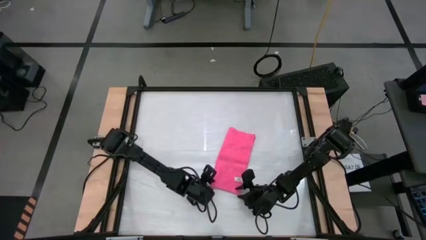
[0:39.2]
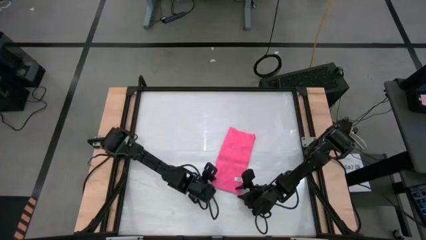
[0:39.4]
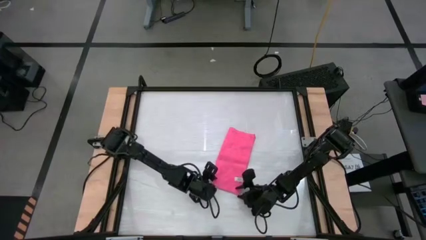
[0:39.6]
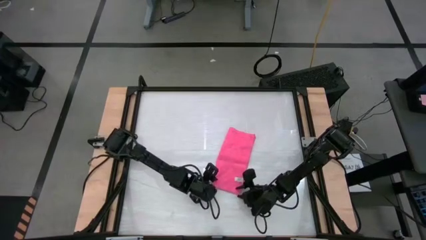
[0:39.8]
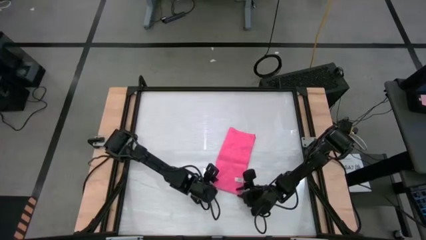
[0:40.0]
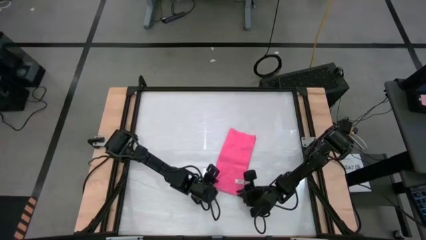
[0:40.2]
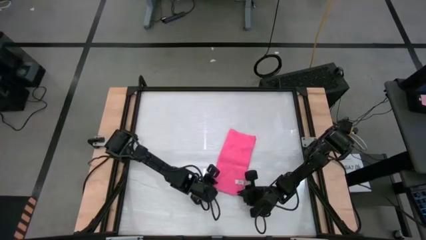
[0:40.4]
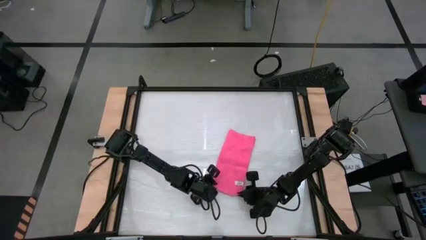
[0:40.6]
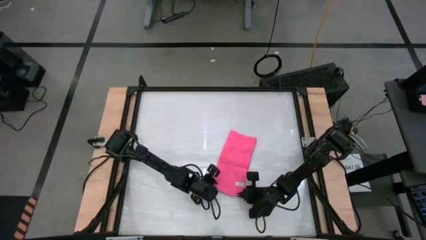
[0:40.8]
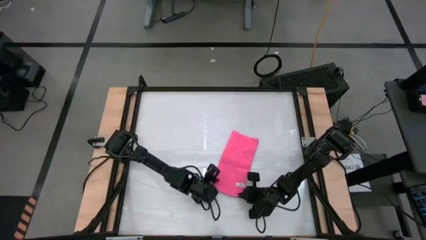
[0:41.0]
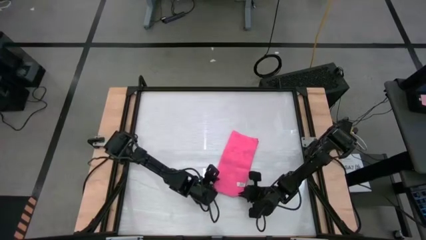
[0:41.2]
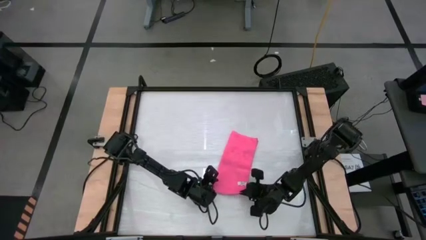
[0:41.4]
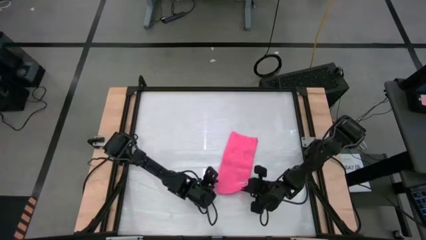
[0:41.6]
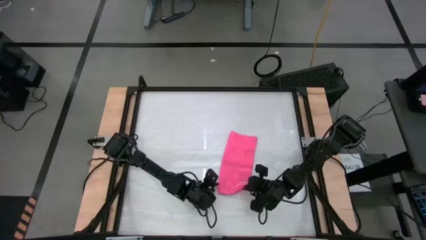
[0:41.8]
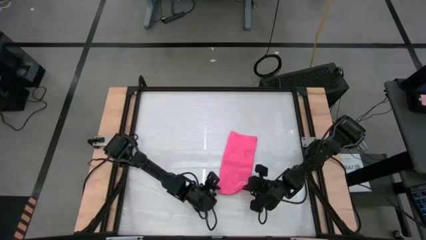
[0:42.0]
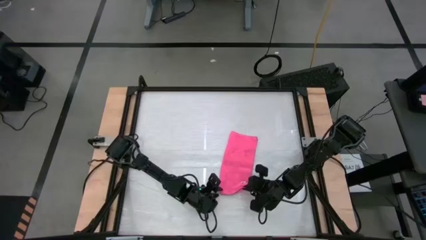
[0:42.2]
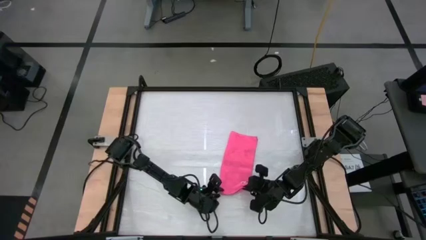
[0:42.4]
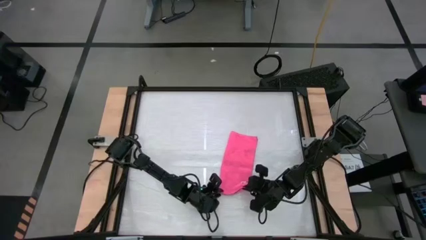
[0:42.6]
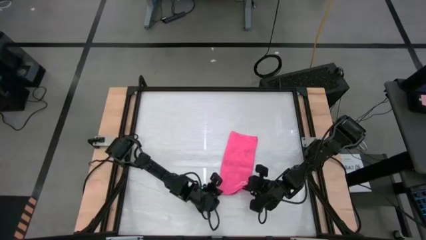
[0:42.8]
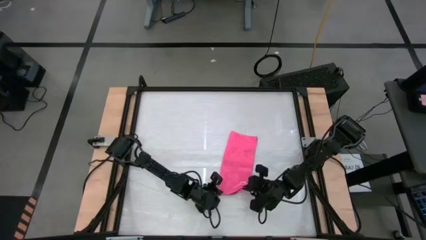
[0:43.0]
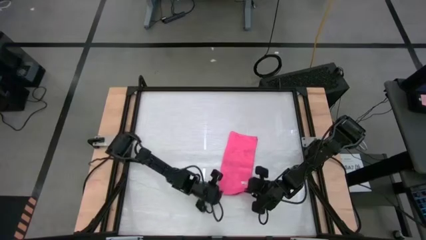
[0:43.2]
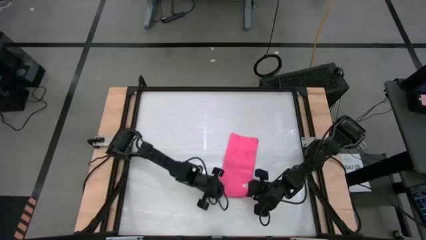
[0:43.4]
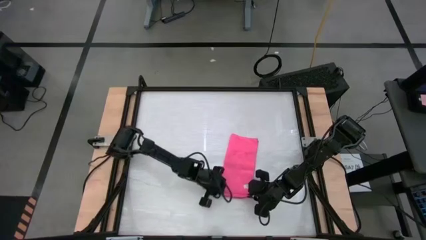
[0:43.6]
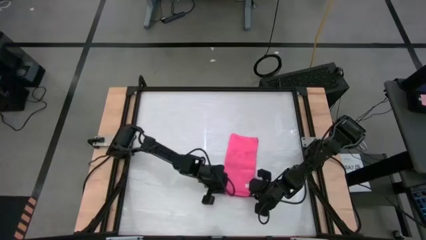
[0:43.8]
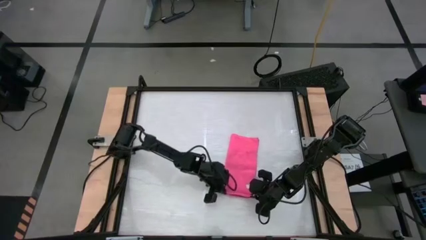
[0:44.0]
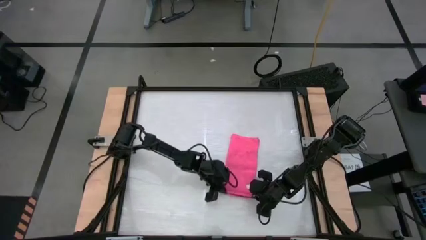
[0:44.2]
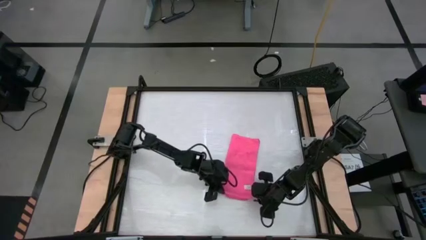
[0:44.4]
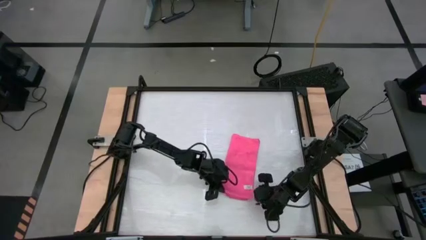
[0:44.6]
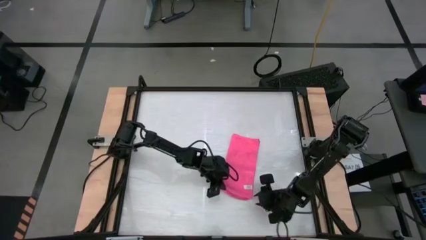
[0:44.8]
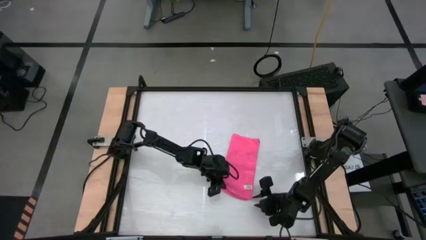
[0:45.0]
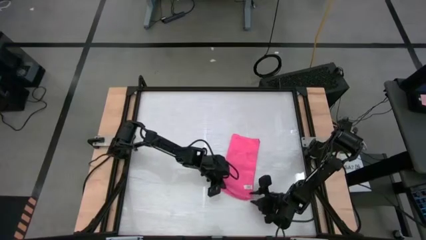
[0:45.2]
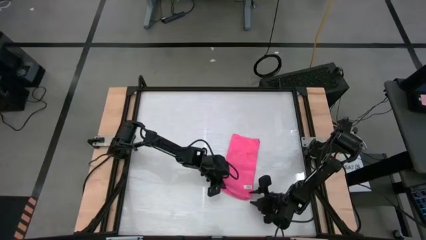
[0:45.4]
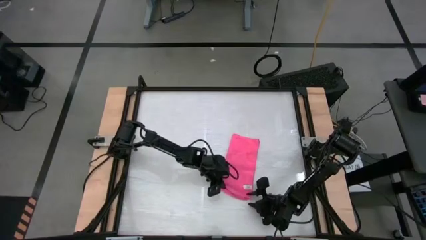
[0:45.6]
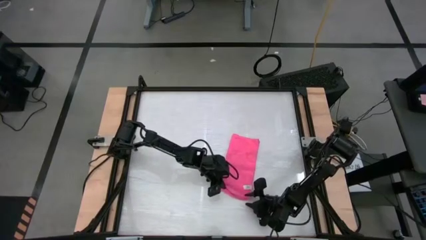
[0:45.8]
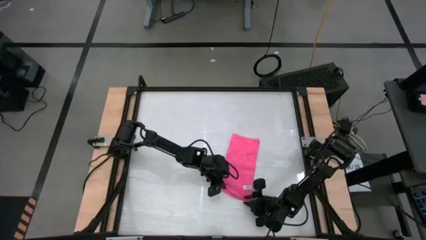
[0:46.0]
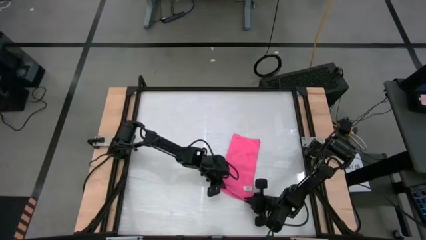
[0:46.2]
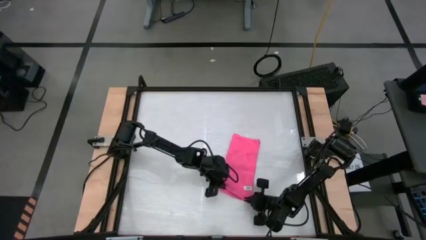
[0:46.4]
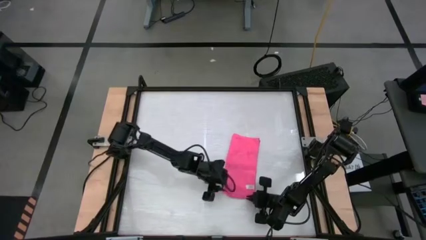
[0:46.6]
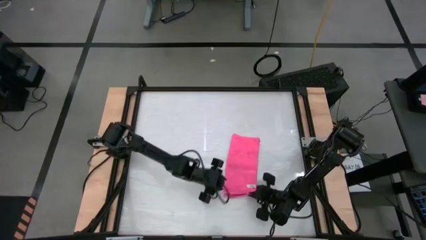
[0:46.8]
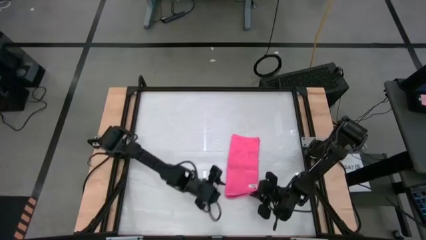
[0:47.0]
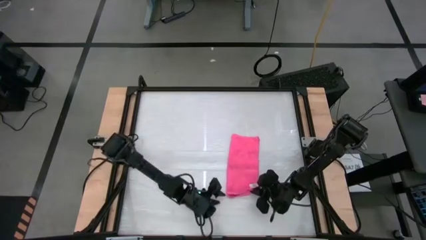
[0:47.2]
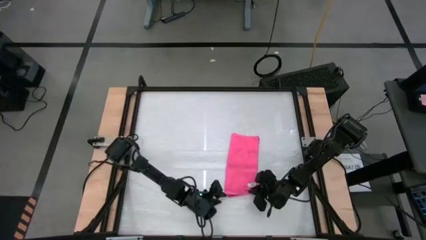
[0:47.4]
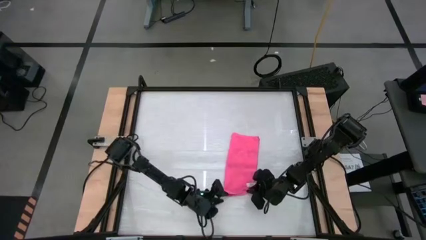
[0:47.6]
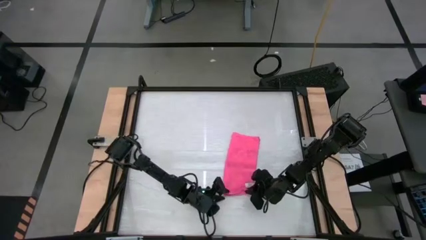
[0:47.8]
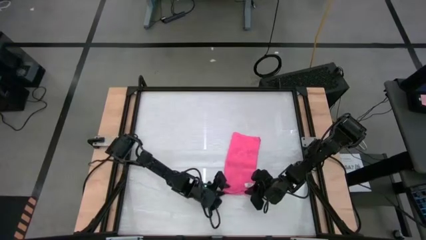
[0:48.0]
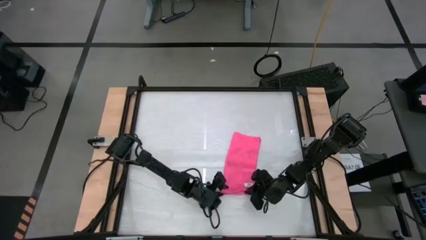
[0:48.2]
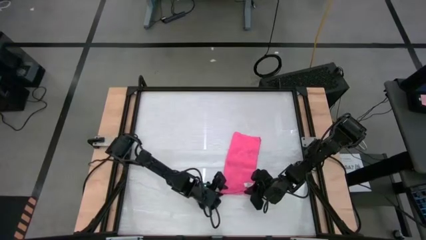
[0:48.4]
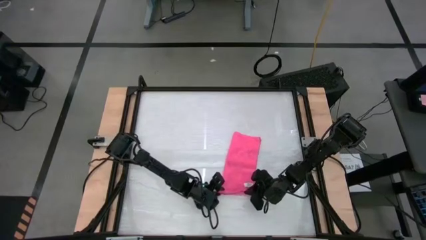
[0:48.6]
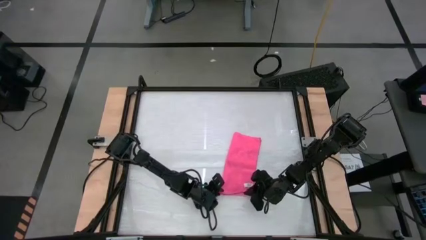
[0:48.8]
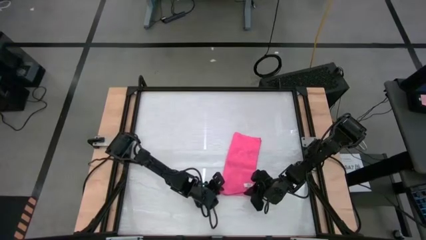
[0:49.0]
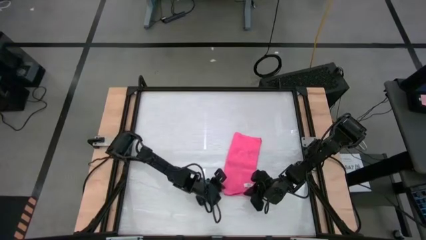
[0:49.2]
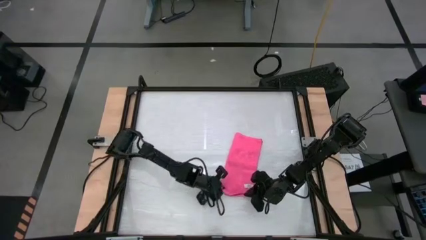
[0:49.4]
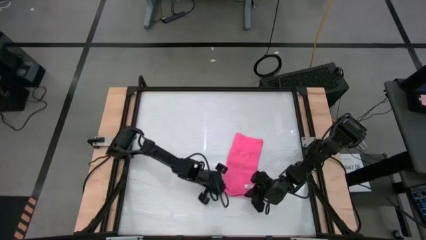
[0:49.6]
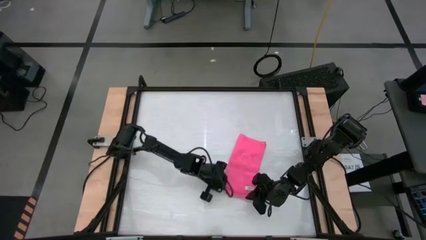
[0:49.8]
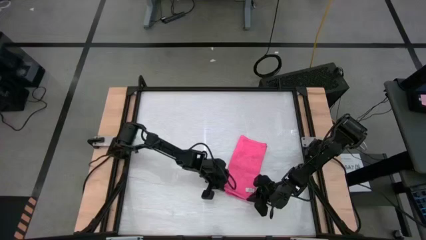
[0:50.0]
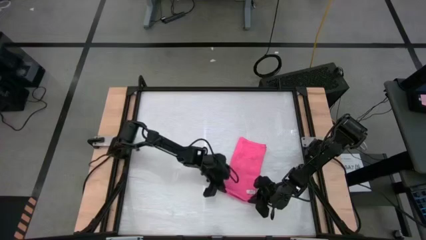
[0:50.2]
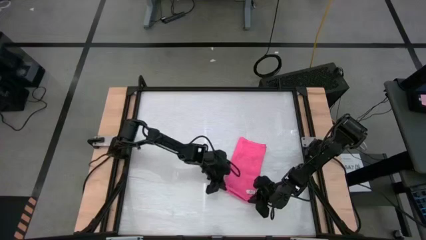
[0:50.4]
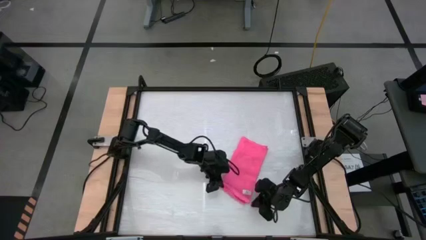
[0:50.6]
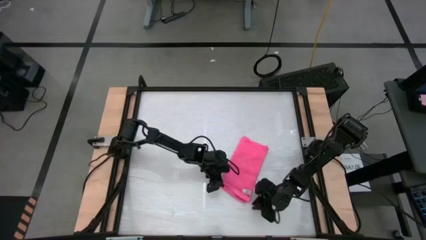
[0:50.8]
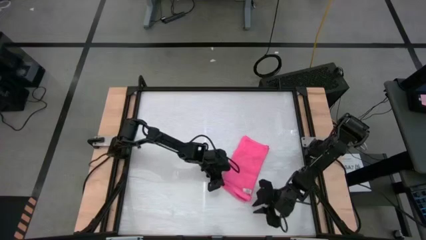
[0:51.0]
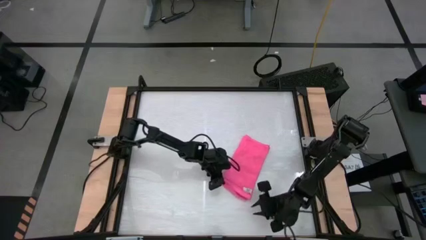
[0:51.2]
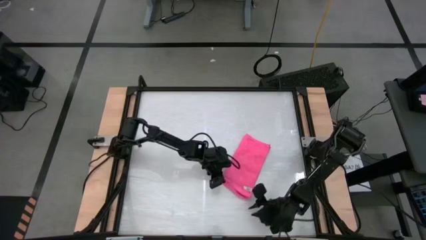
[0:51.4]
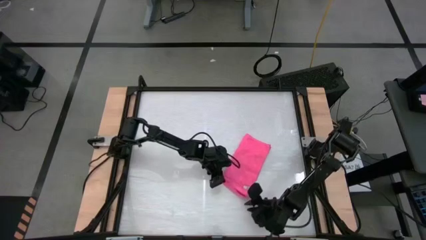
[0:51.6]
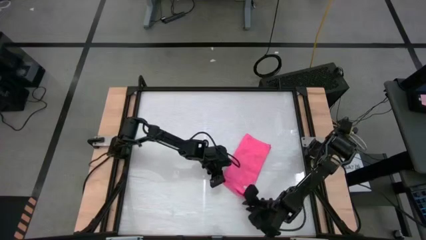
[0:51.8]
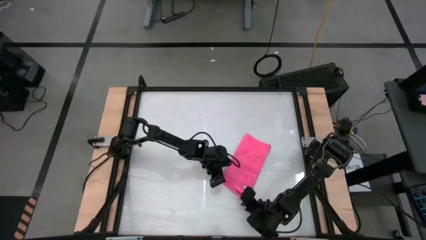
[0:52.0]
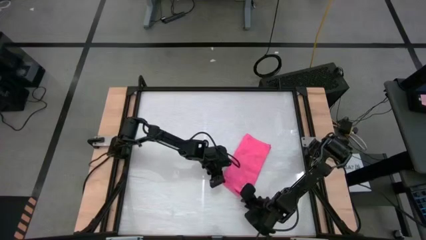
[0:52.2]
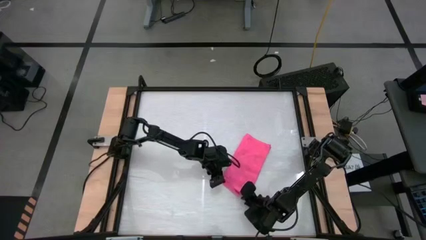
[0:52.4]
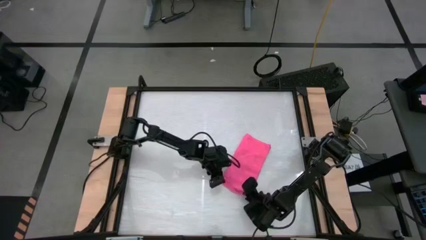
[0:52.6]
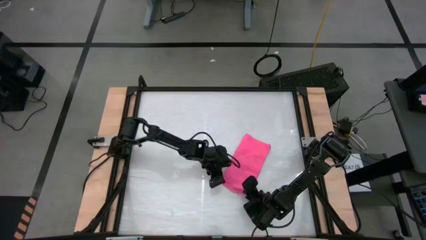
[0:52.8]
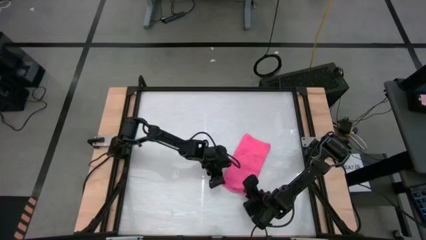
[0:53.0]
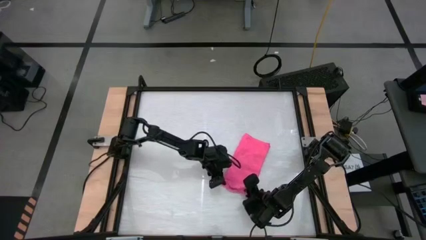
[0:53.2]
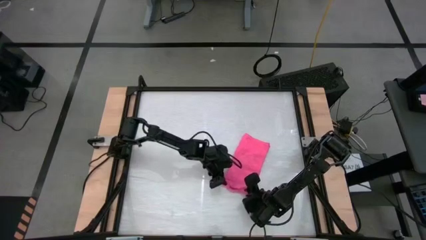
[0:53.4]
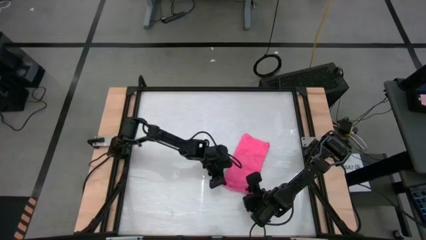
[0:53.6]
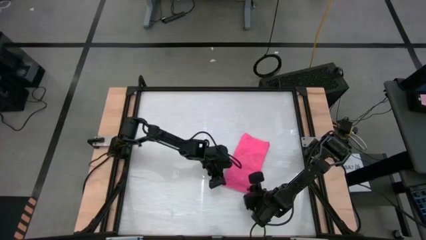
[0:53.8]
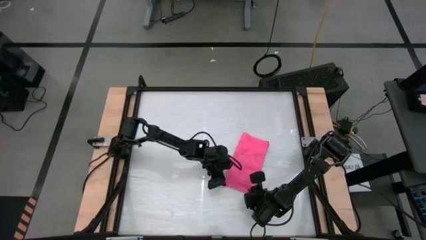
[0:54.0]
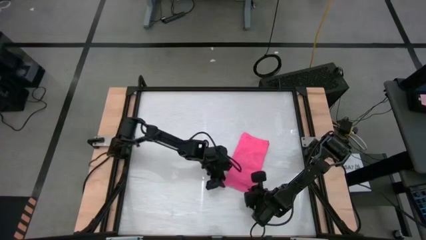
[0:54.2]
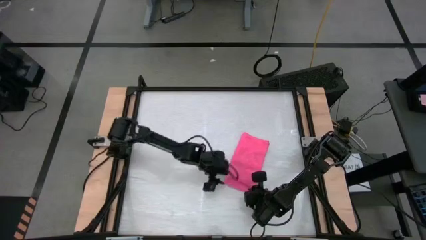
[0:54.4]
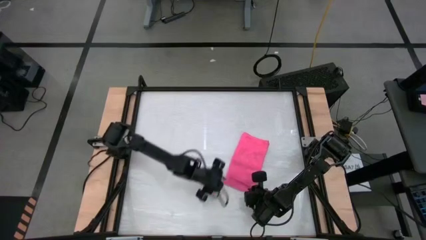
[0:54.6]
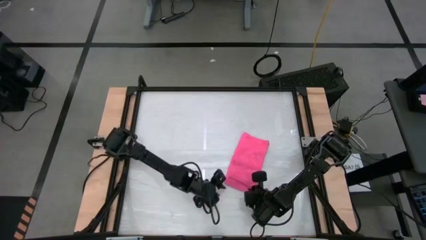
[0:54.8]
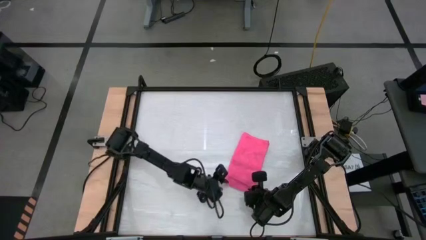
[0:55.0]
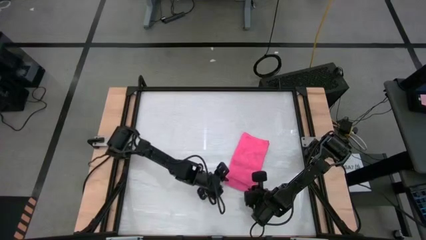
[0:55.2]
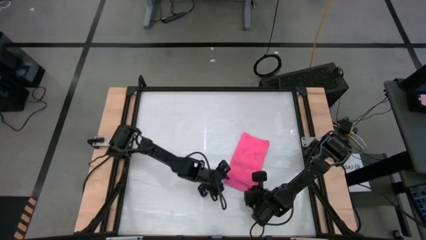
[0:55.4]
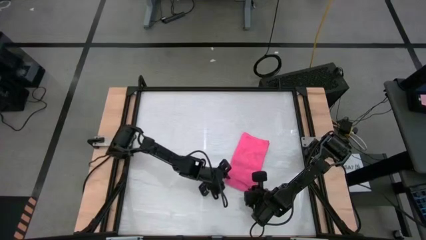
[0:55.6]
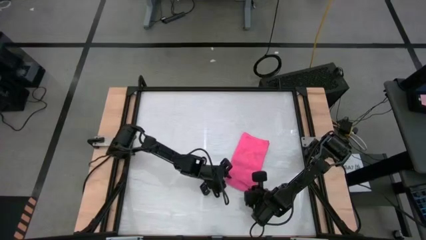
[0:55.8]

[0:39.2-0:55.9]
Task: Roll towel
Roll the pink towel
